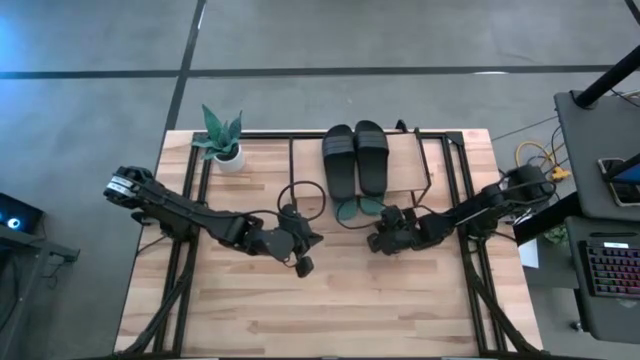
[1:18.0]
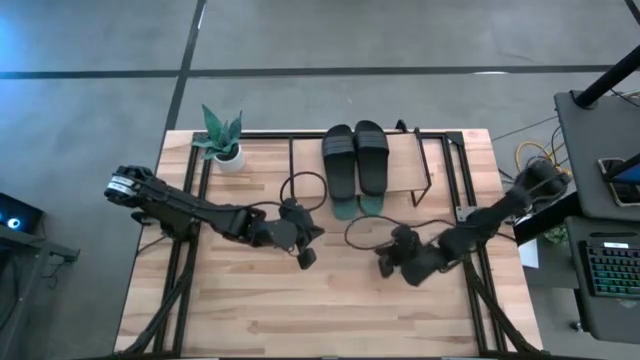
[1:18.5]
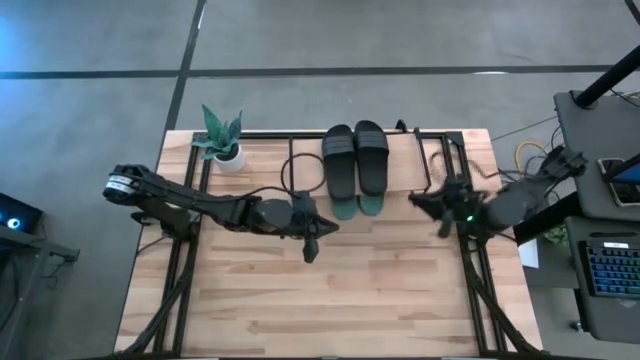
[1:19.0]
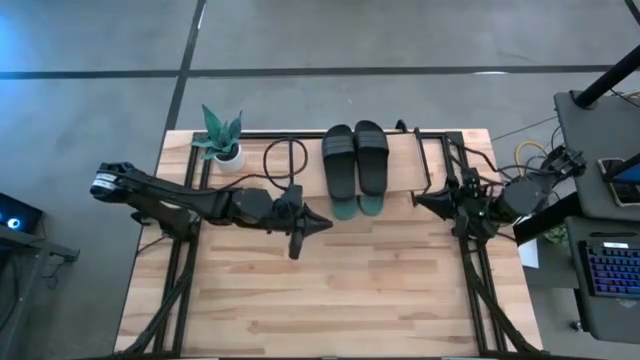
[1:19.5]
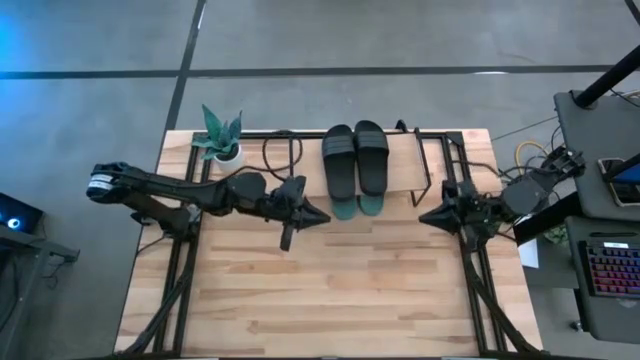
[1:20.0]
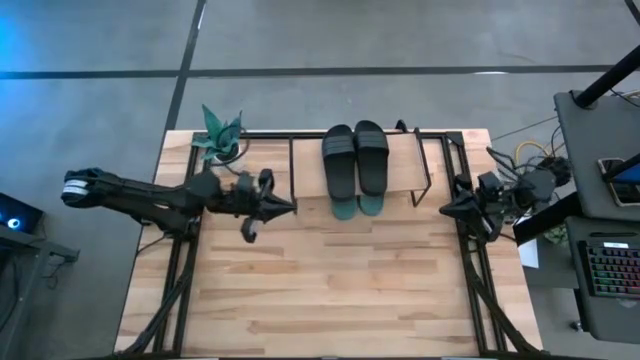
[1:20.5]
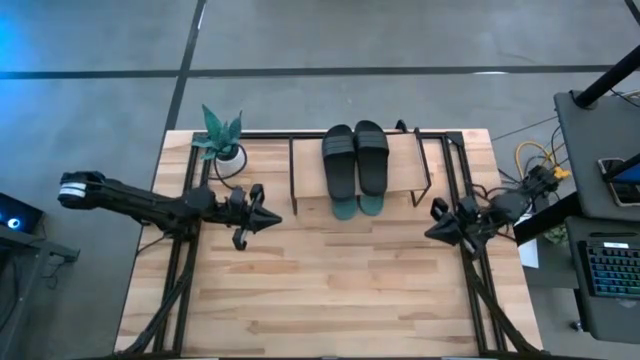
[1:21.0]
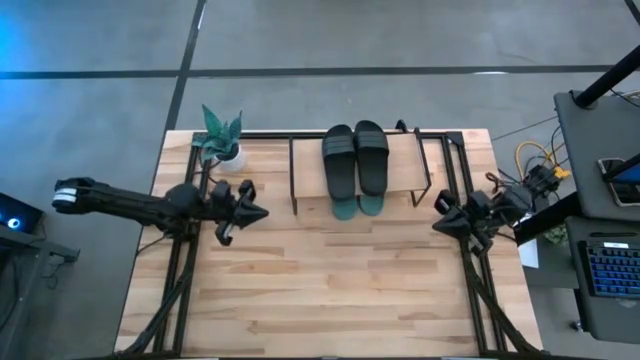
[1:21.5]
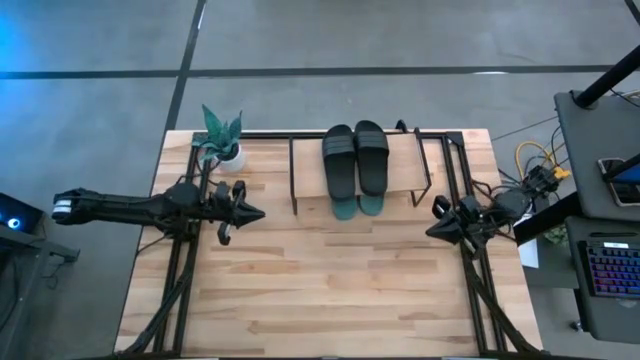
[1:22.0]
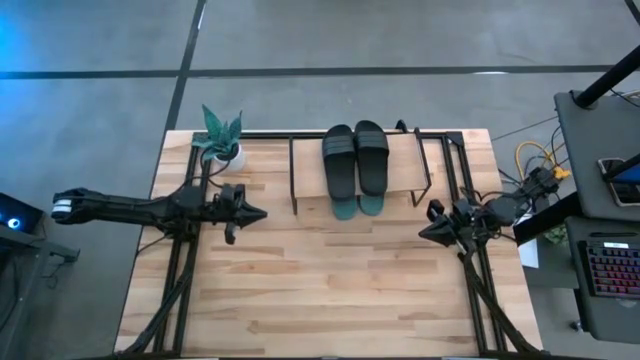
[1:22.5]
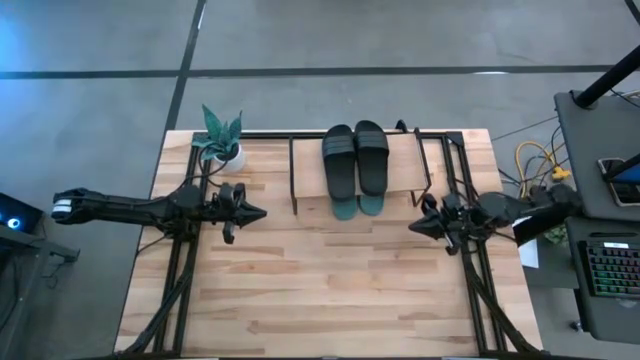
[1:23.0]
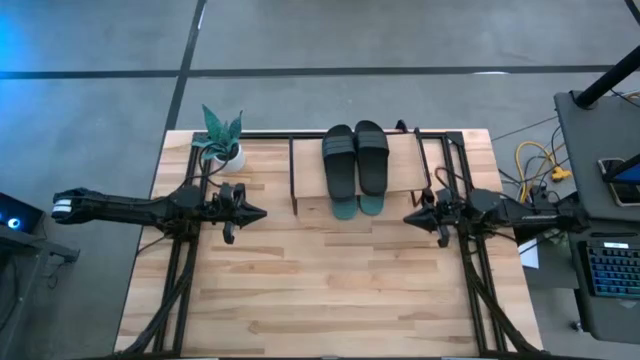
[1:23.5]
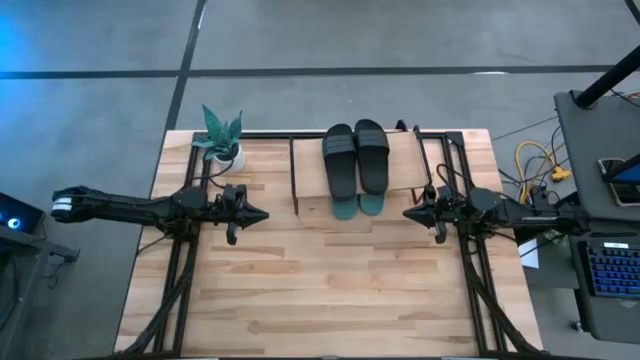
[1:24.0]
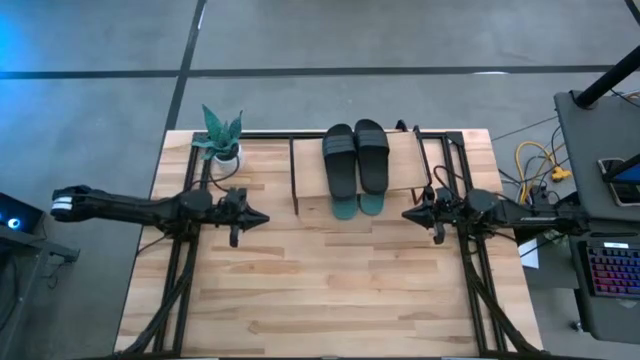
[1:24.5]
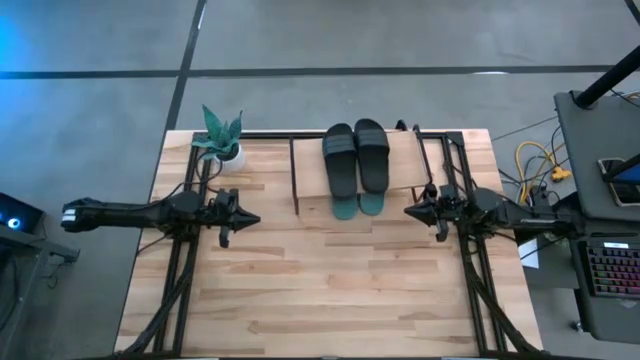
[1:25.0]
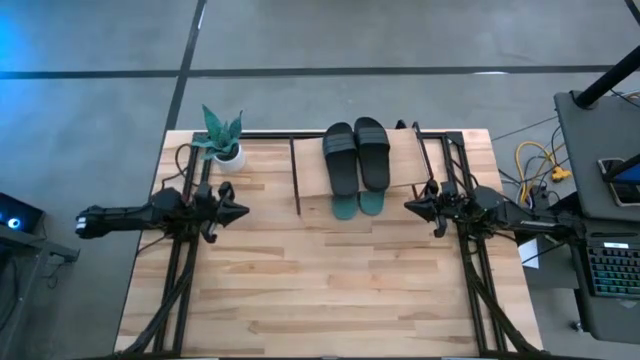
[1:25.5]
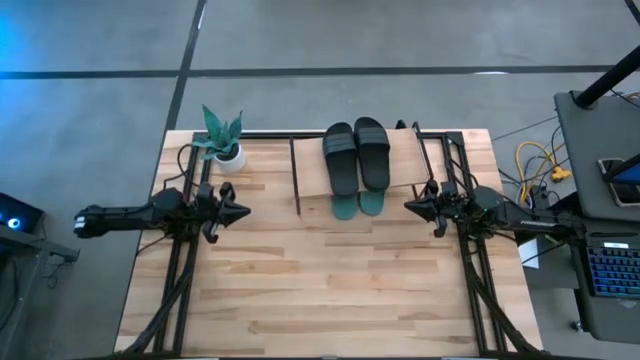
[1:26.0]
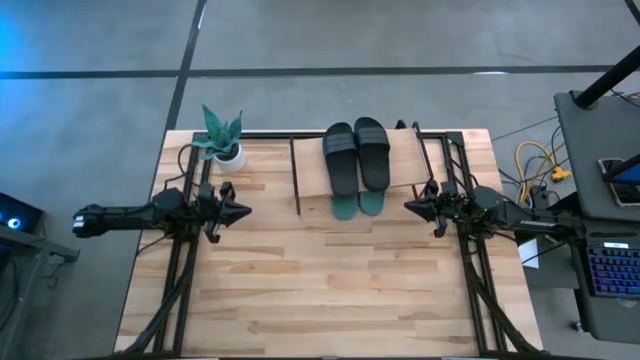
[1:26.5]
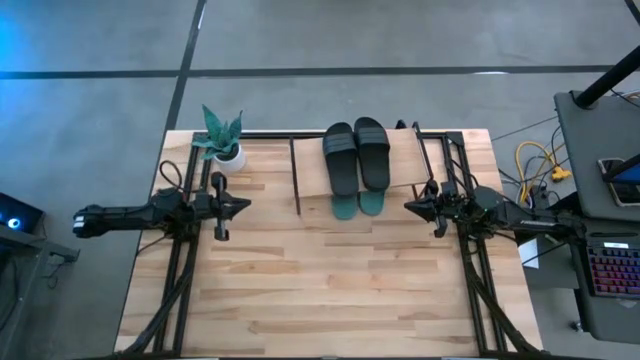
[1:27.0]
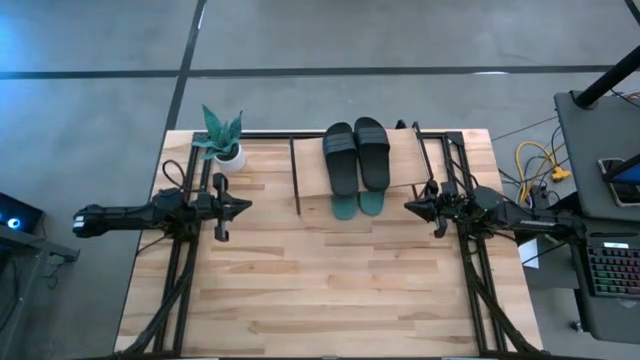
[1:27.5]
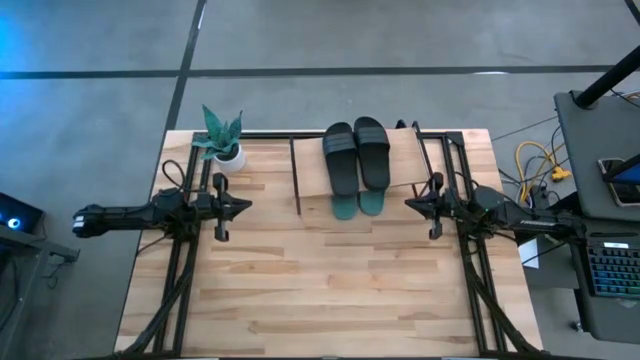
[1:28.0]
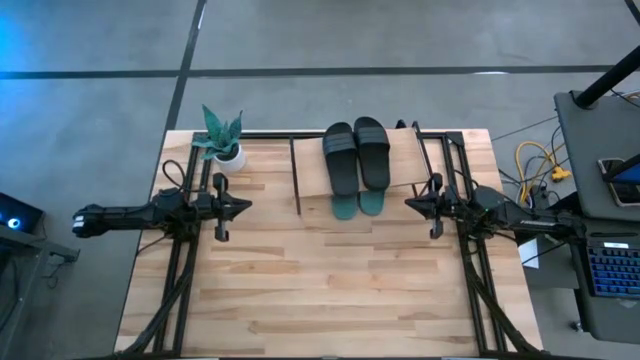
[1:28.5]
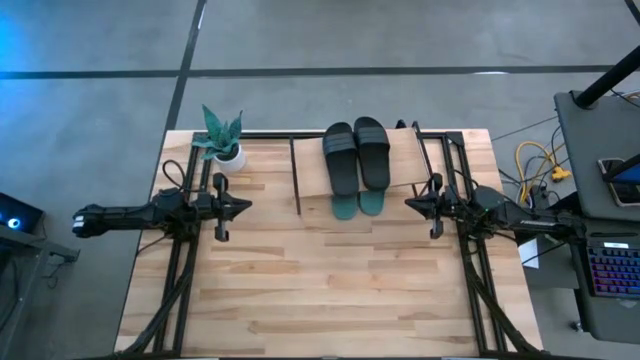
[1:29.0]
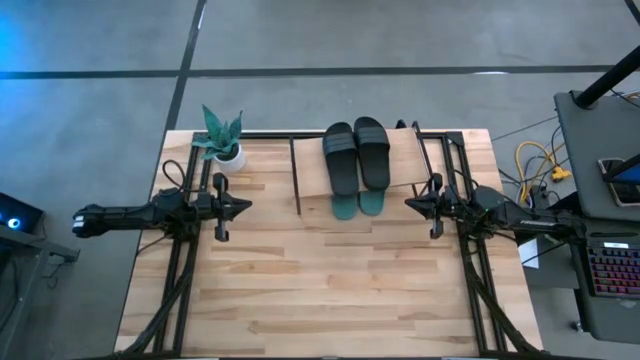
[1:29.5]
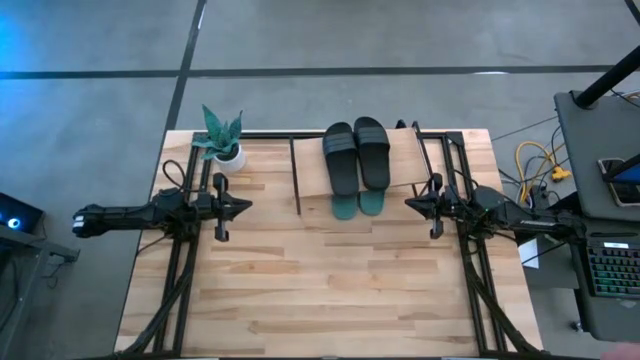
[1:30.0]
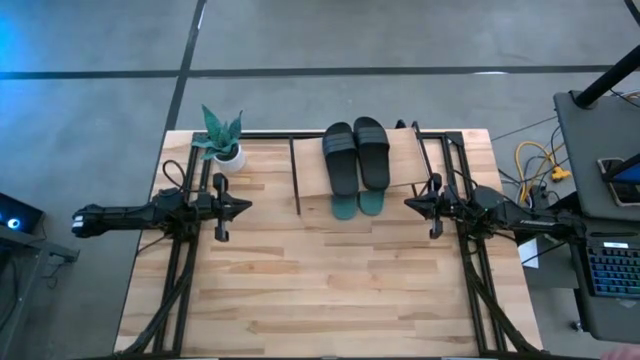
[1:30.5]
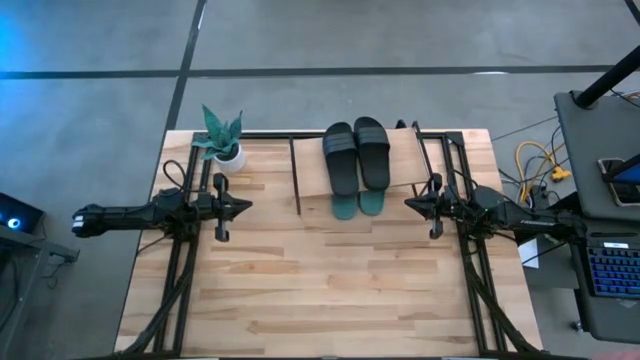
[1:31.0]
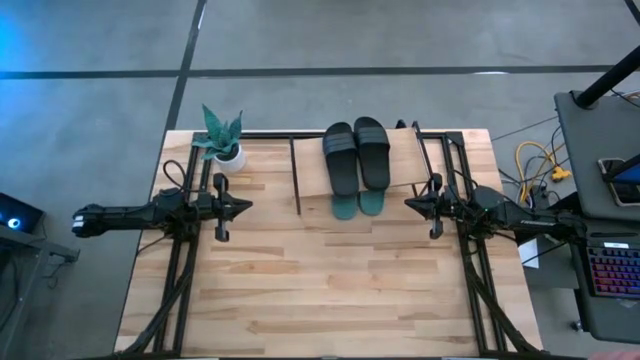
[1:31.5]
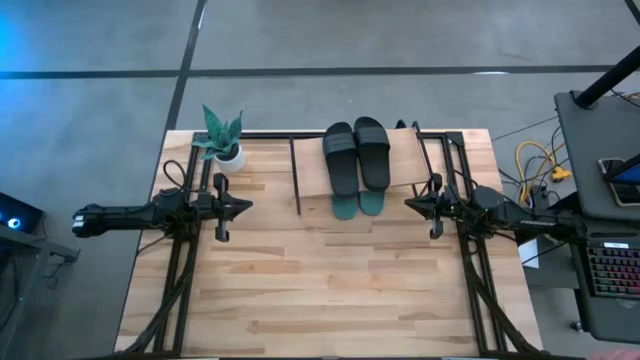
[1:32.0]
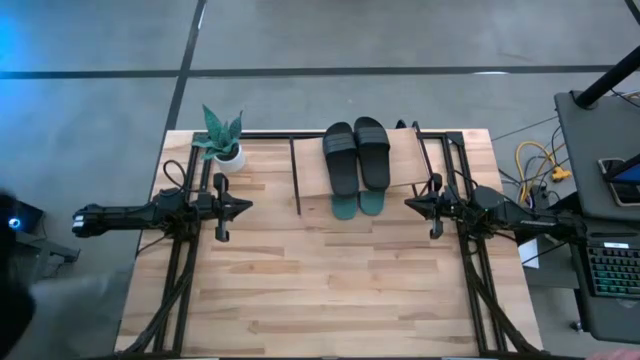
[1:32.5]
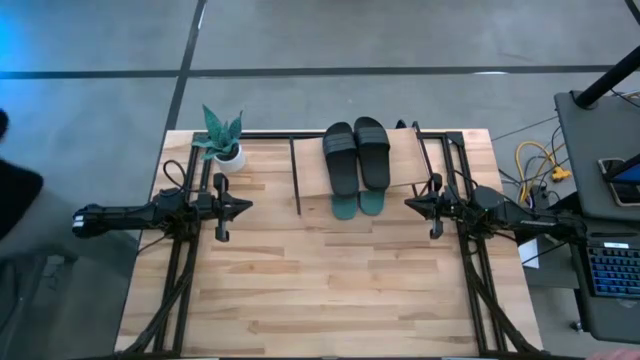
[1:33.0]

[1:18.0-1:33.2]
Task: Pick and place slides into the shelf
Return to Home Position

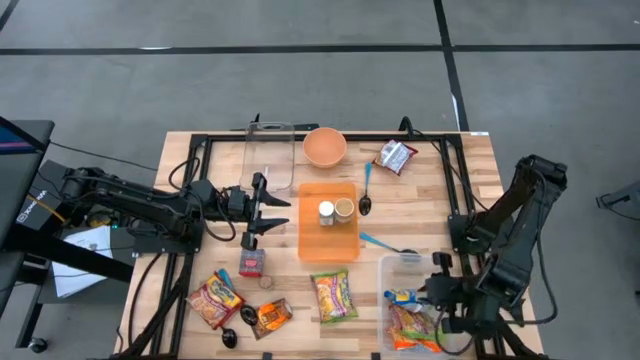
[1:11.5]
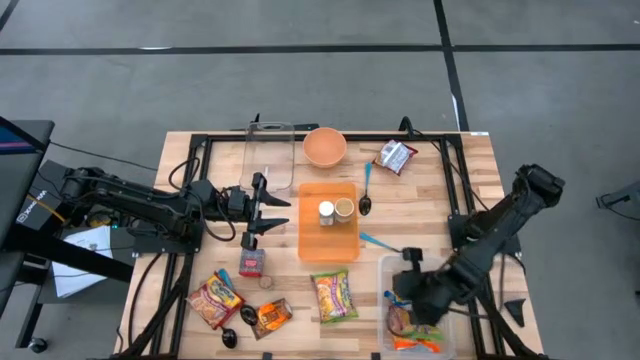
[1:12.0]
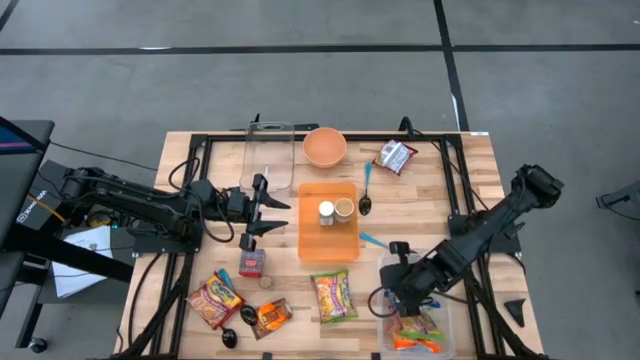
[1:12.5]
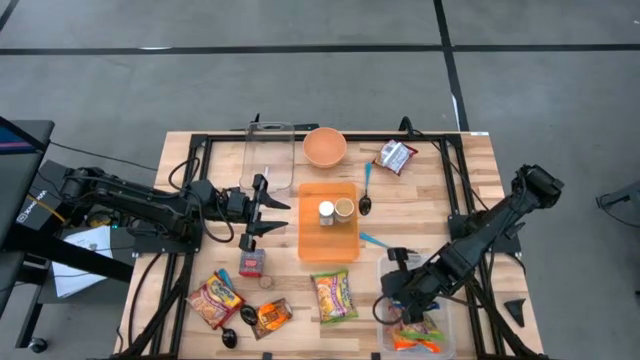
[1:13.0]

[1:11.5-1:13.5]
Task: Pick & Place Food Item
Adjust the transparent container on the table
